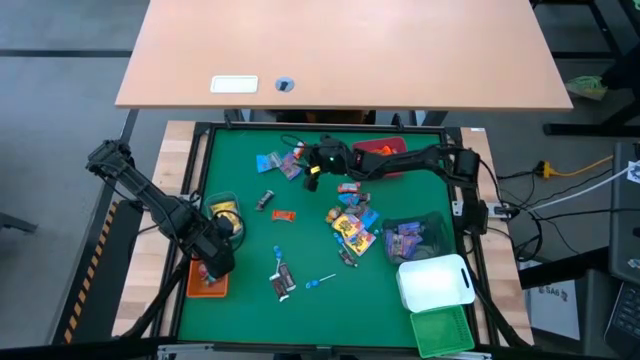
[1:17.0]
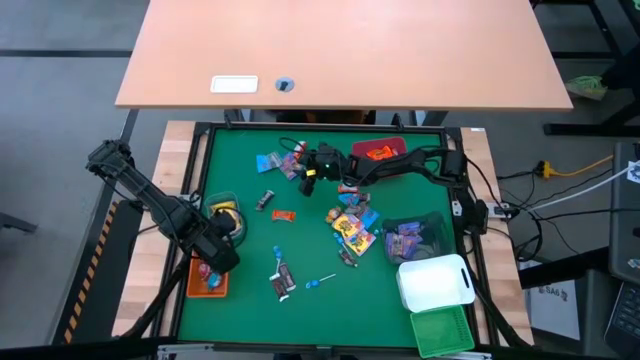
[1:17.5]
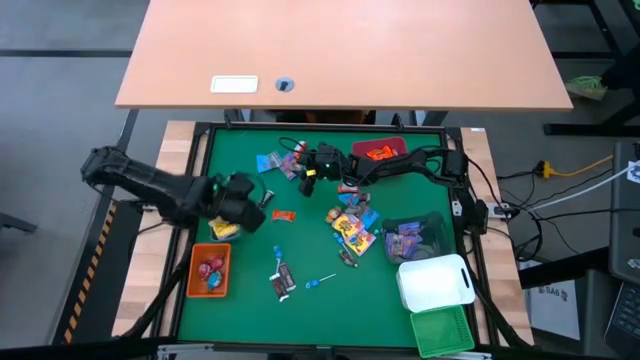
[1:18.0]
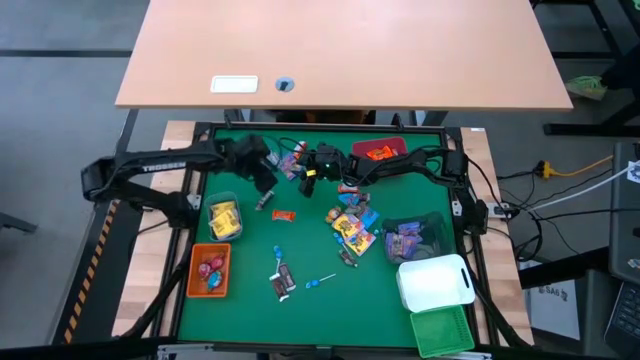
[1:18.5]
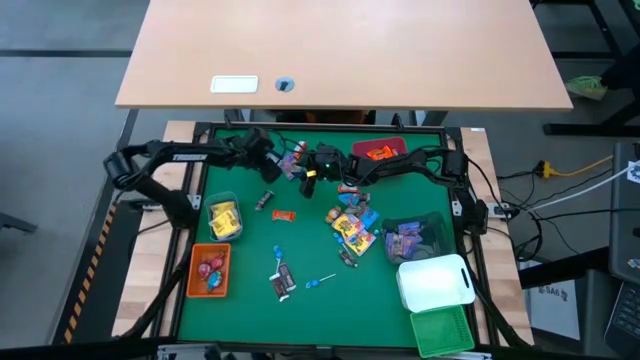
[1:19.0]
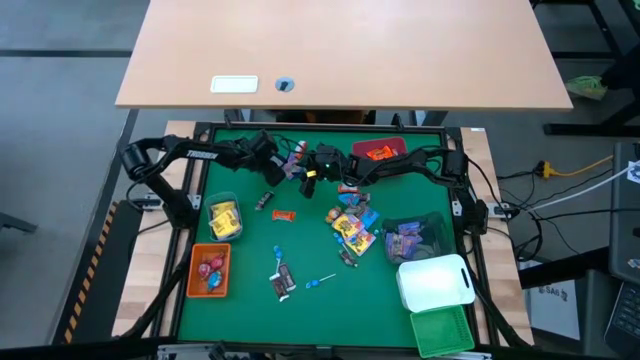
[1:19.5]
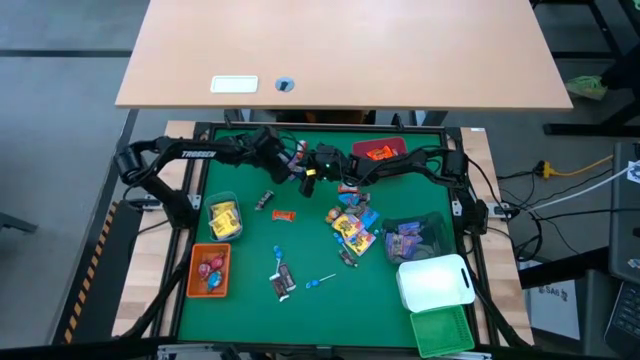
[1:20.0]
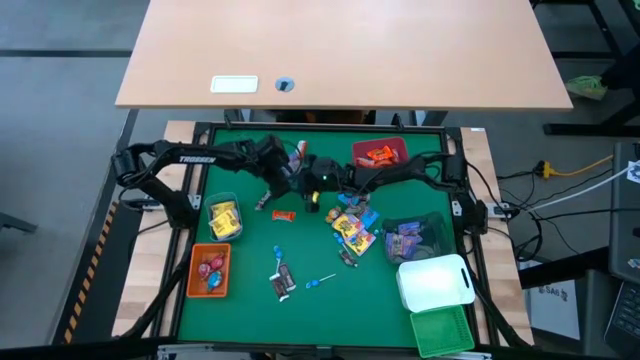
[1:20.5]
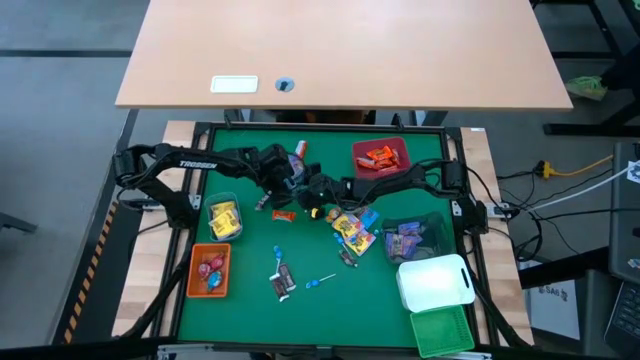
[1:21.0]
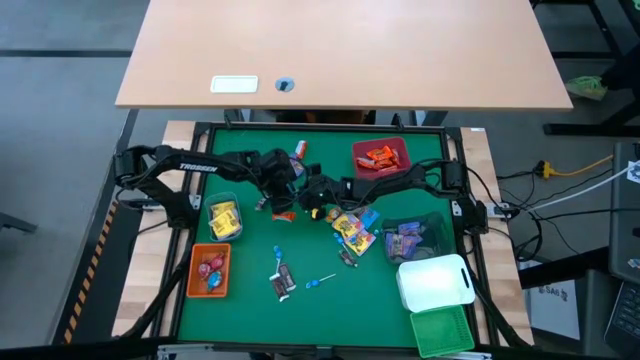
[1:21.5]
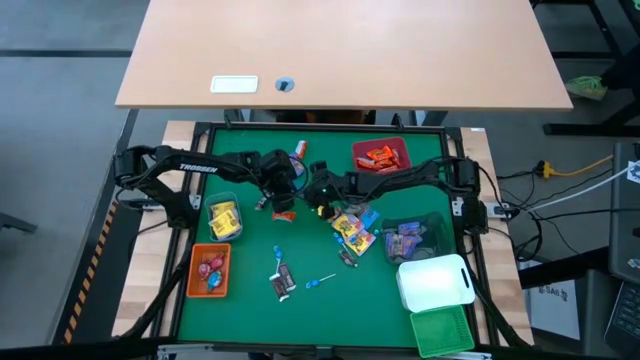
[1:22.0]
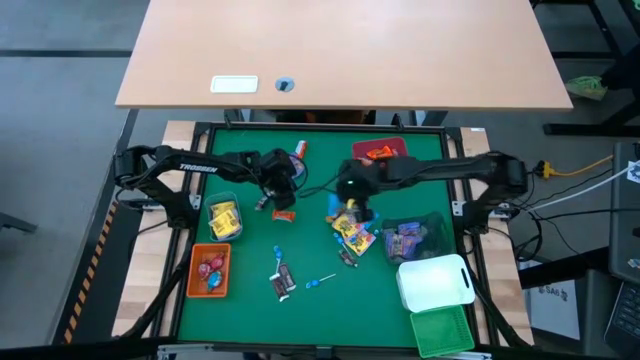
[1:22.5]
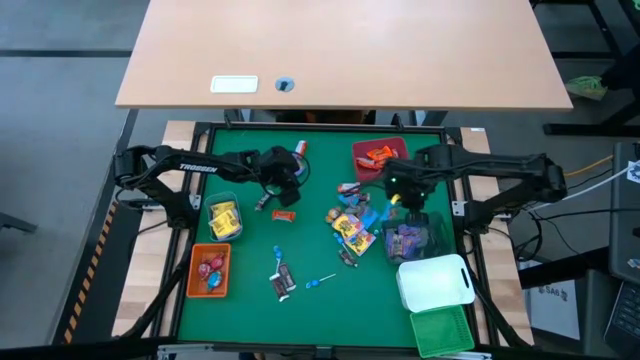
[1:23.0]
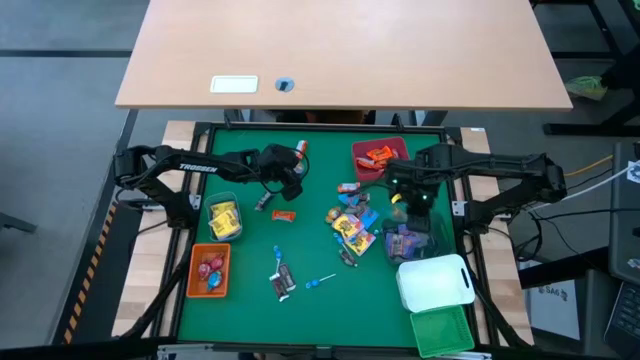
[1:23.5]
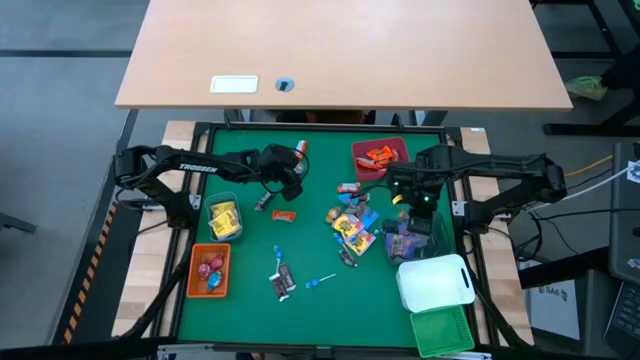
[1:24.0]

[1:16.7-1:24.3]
Task: Sort candy
Put the blue candy into the black bin

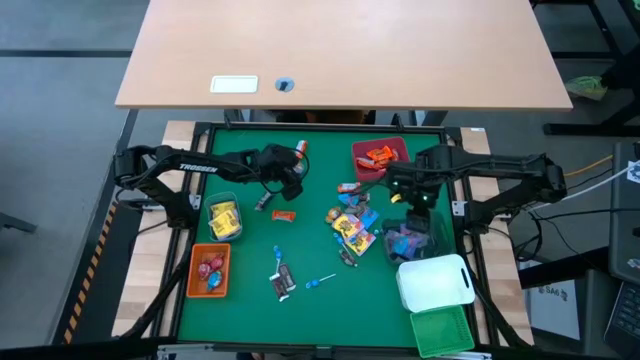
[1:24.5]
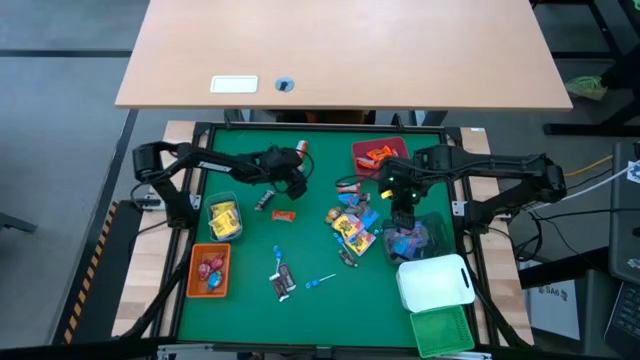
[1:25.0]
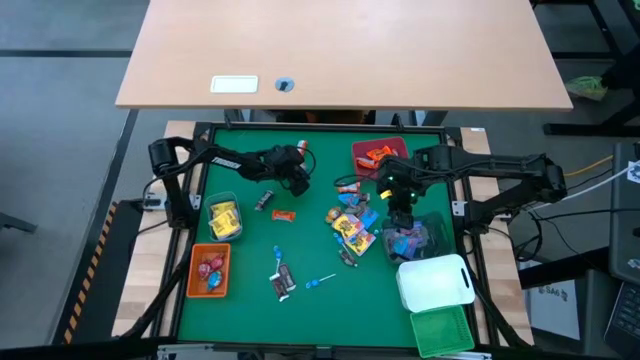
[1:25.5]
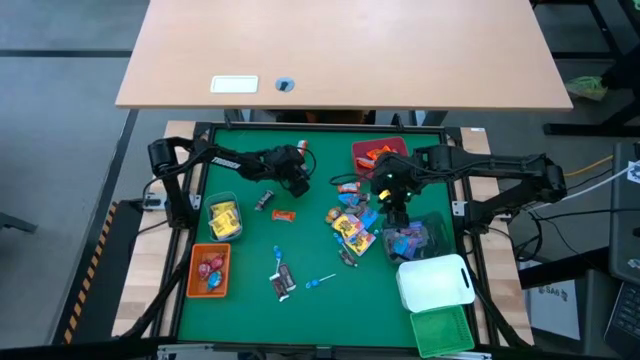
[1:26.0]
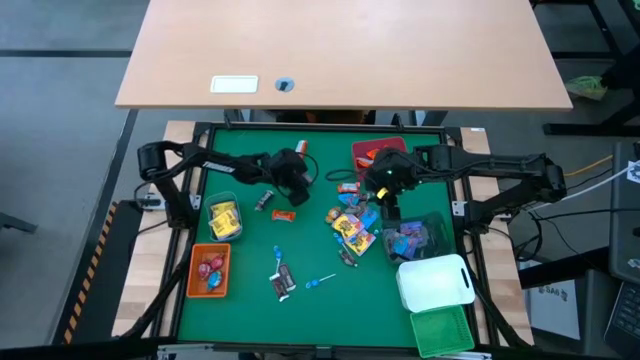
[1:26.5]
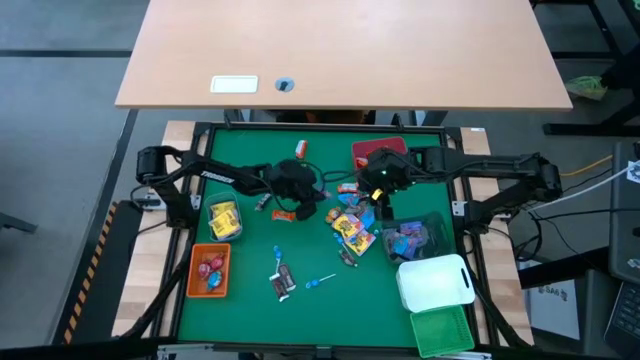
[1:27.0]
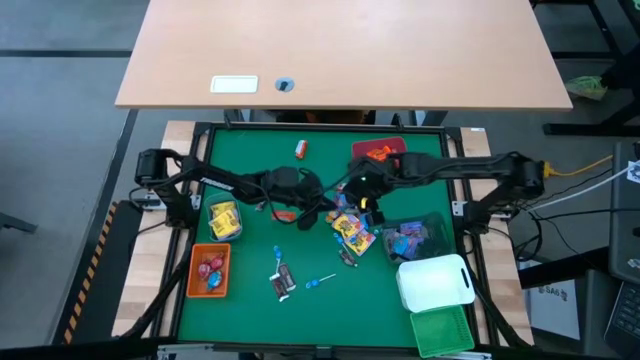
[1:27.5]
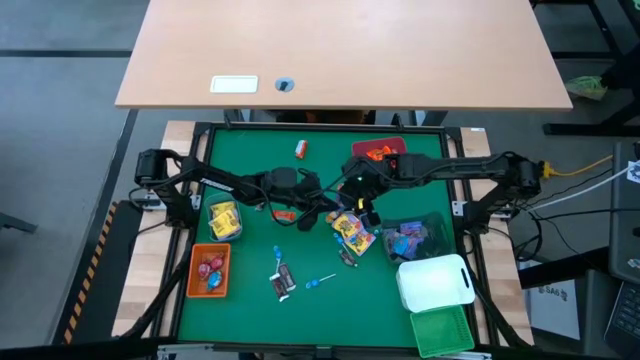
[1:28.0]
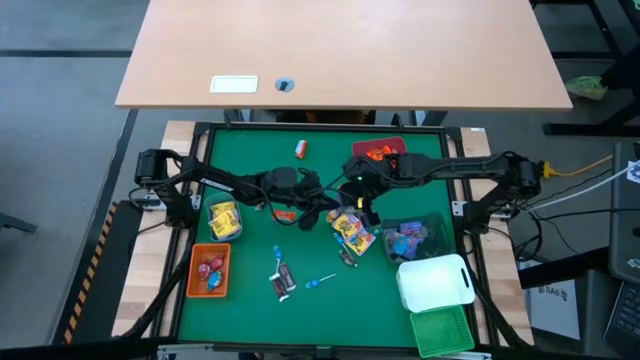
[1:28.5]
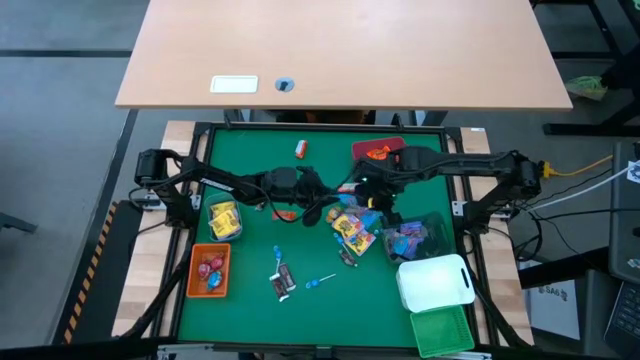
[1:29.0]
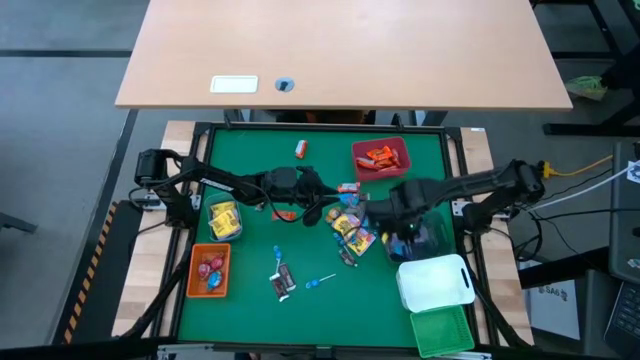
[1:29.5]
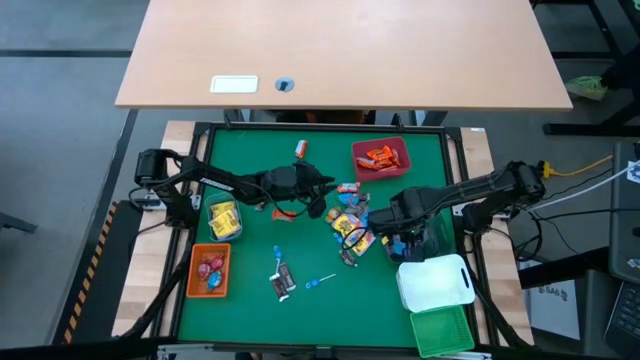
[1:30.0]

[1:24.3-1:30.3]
Put the violet candy into the black bin

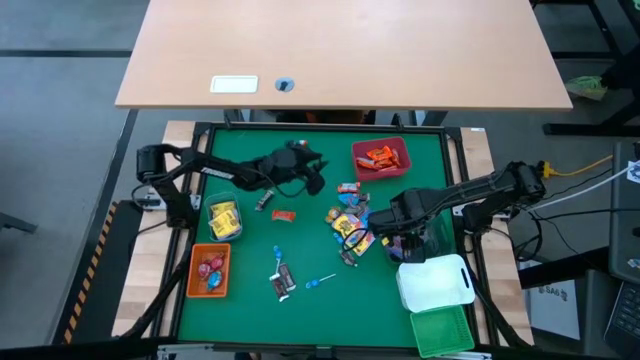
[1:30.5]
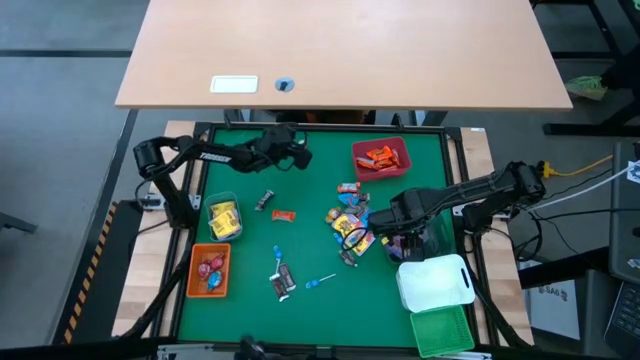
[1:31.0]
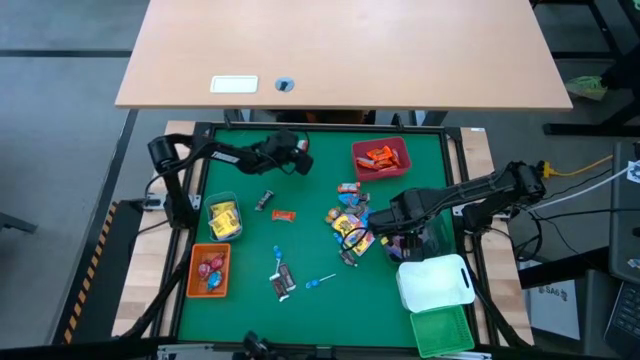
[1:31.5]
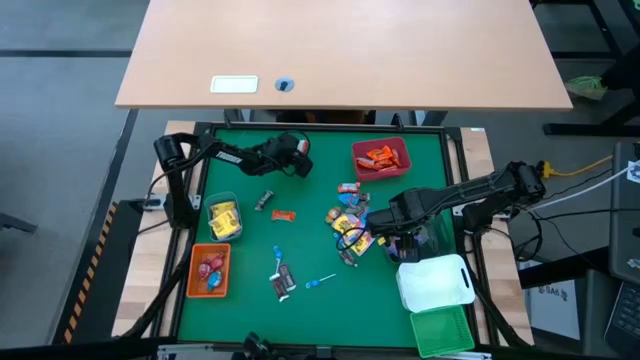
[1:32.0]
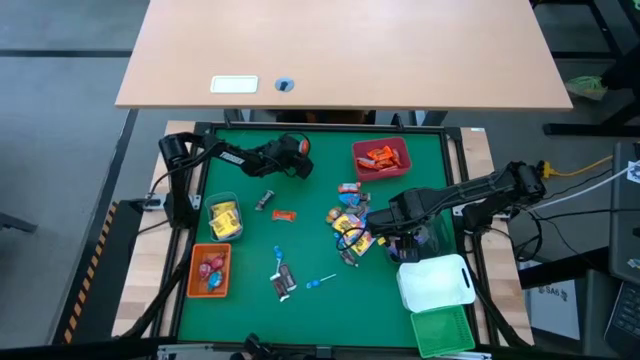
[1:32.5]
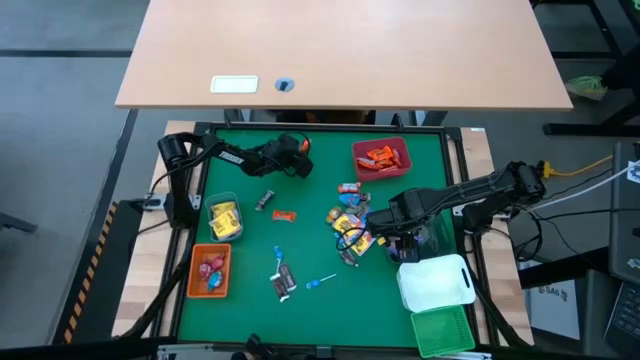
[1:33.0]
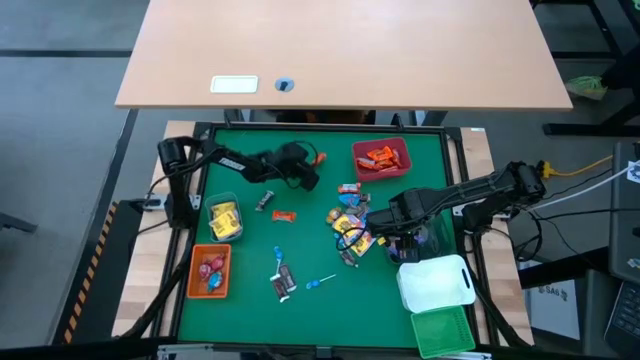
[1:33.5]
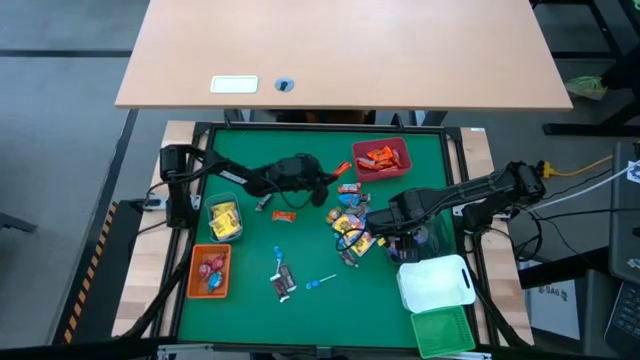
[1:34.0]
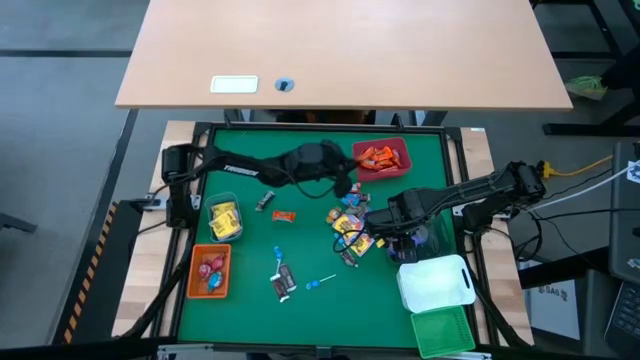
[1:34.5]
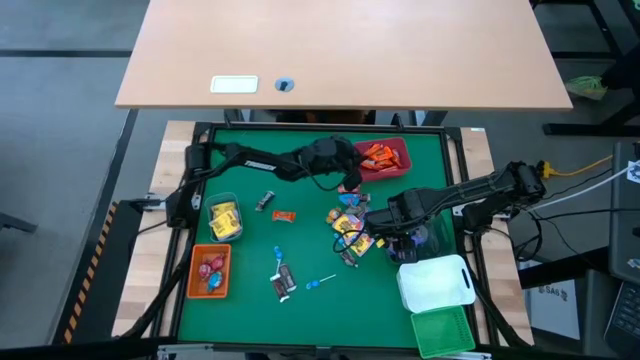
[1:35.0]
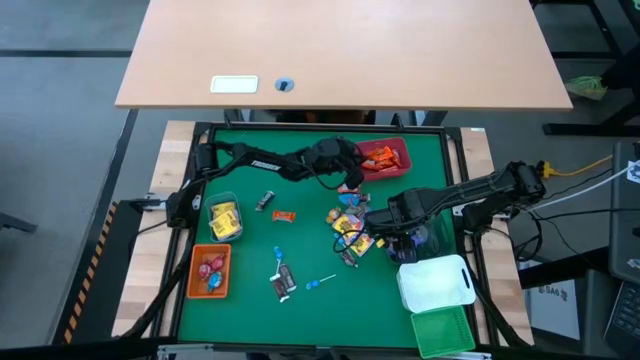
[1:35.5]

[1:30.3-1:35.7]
Put the orange chocolate bar into the red bin

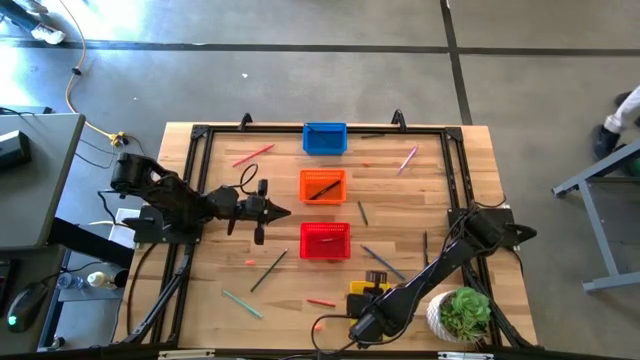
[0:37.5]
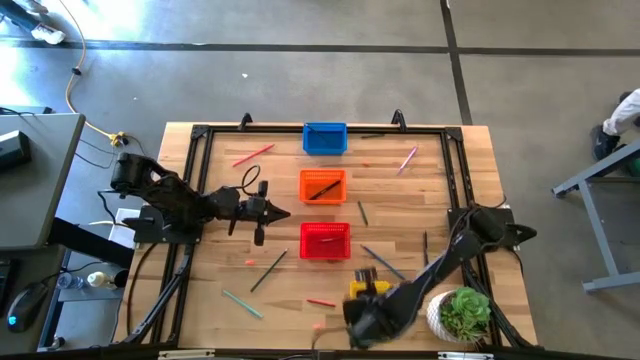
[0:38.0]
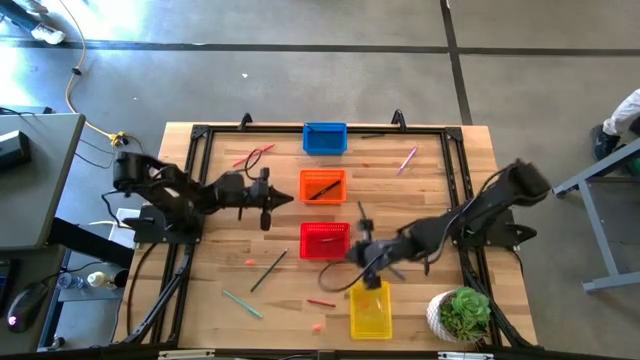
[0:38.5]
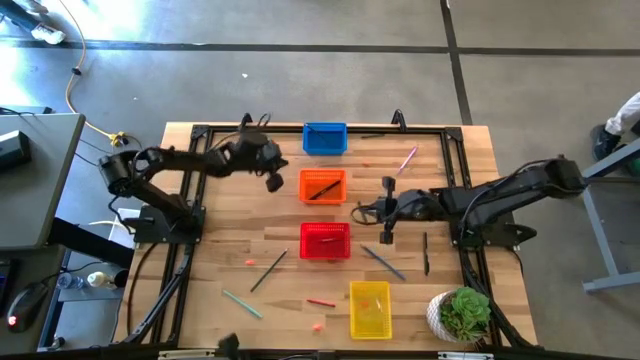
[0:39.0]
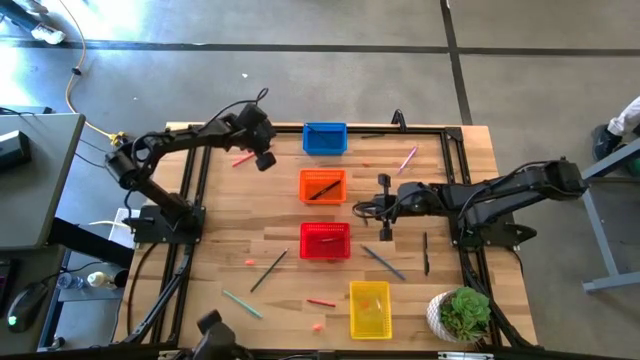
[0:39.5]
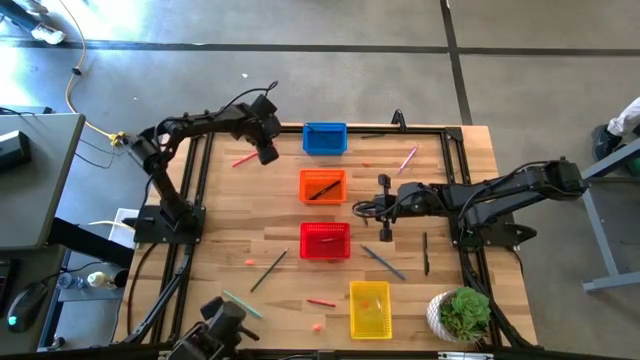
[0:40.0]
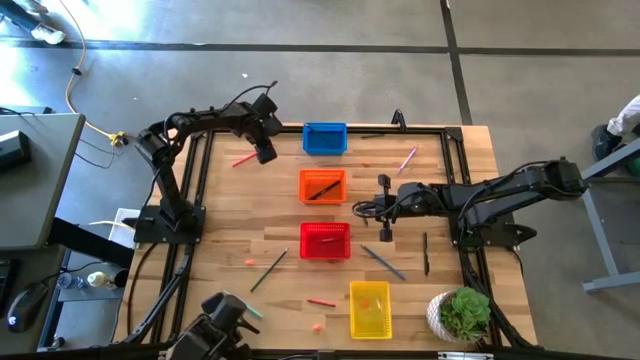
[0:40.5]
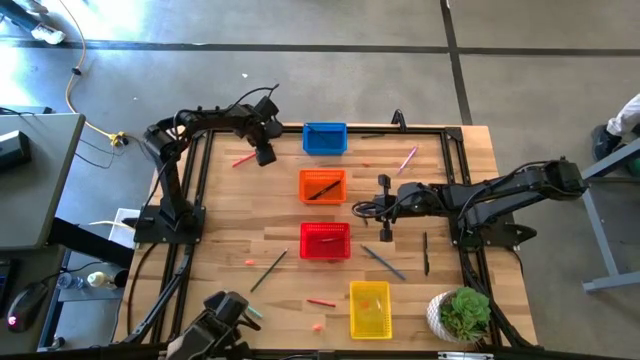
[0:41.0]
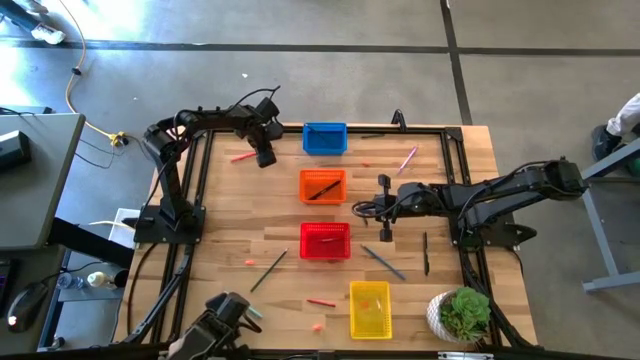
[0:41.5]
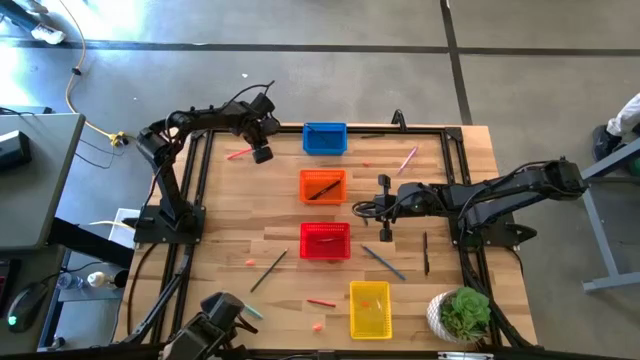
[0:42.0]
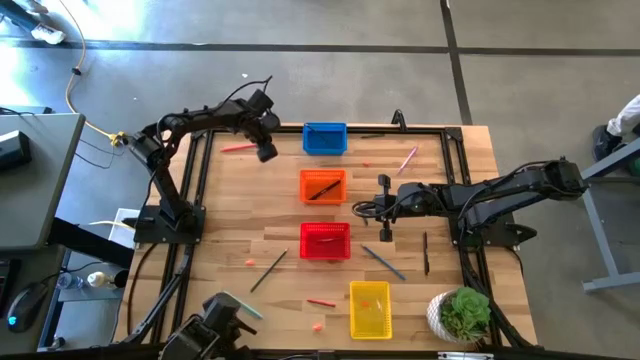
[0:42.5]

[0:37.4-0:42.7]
Task: Sort crayons/erasers/pens/pencils in bins
Put the pink pencil into the blue bin
